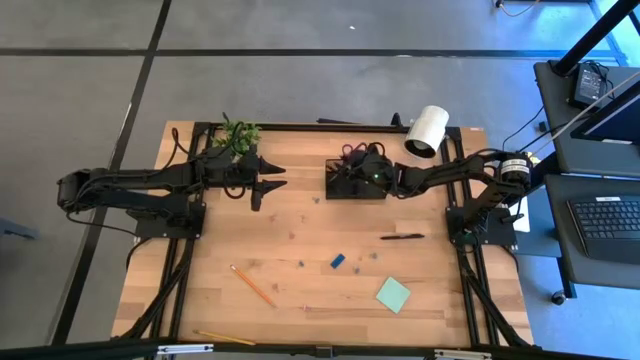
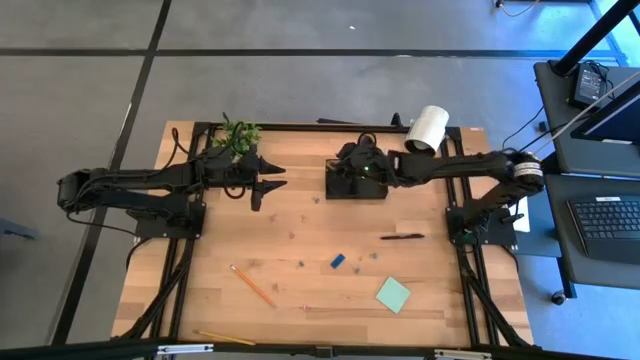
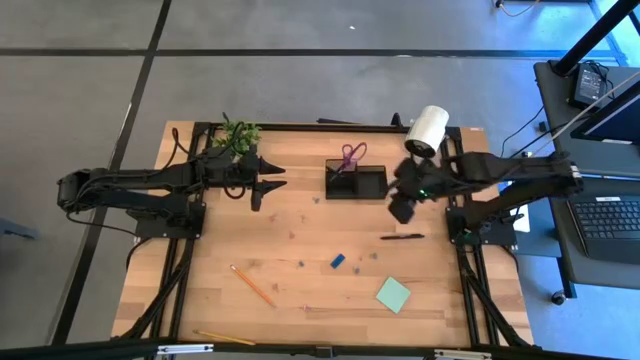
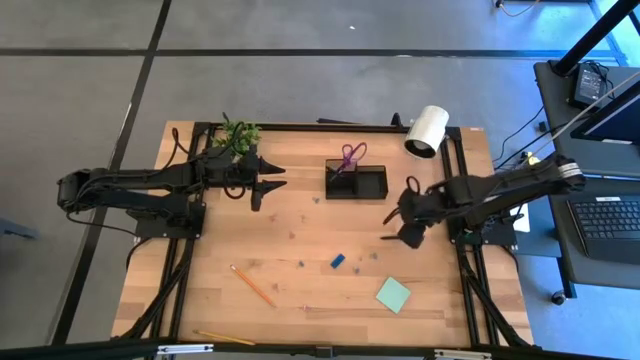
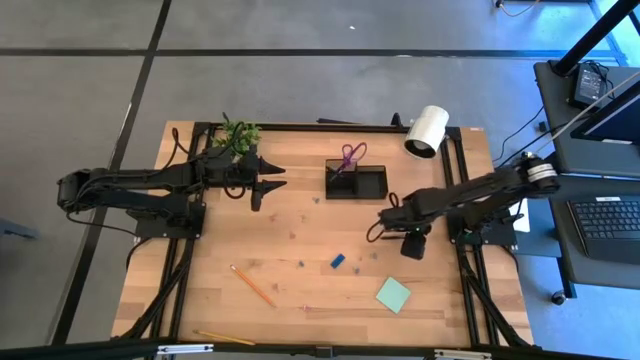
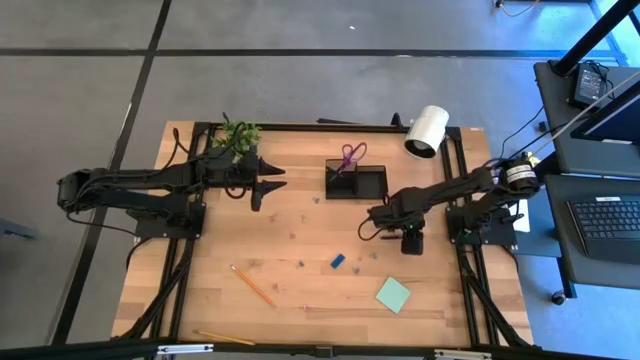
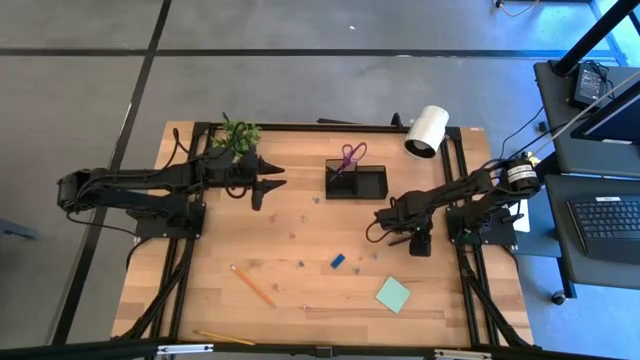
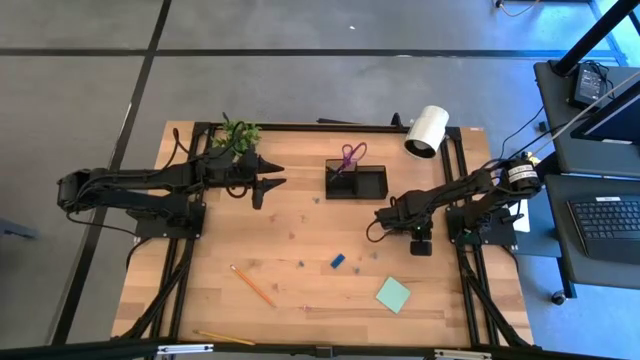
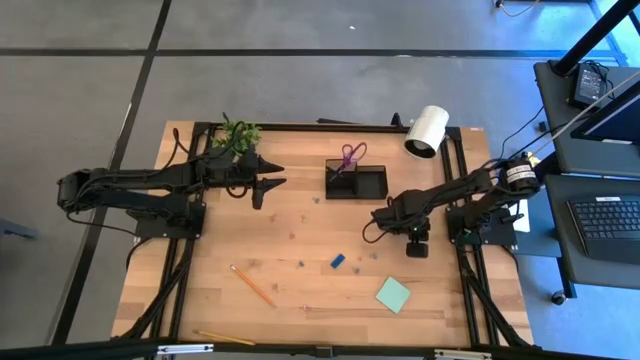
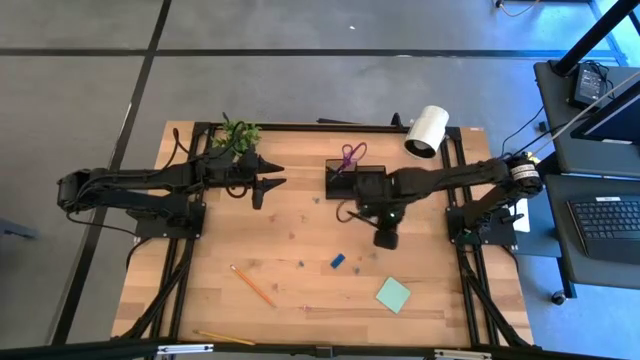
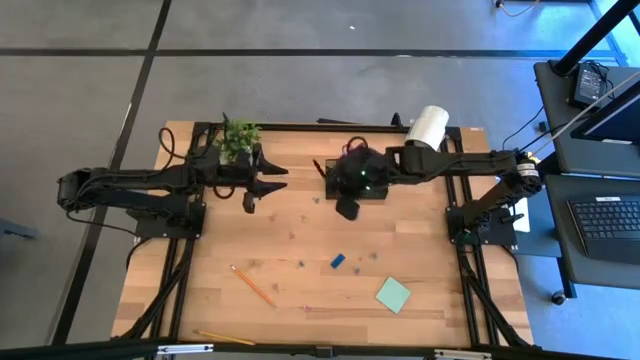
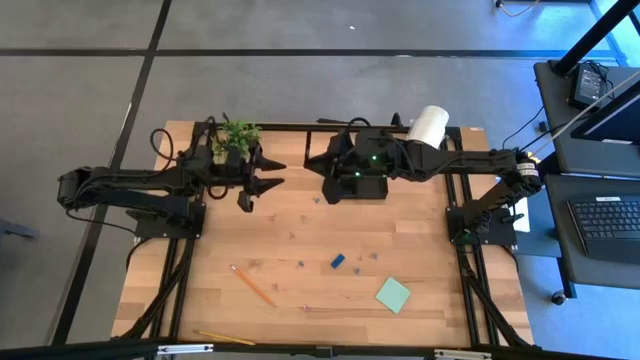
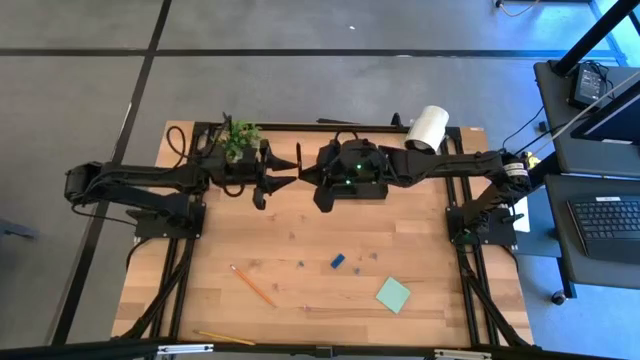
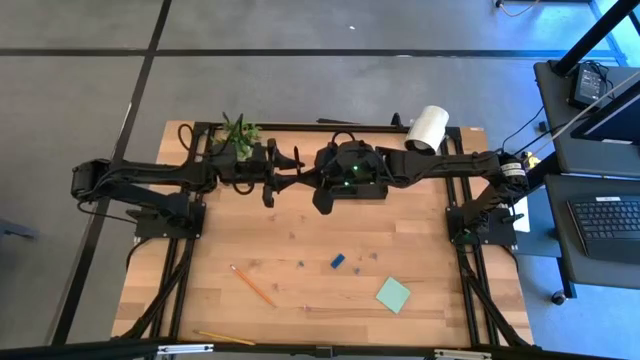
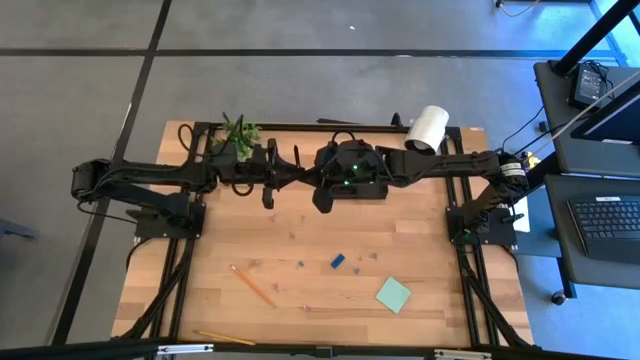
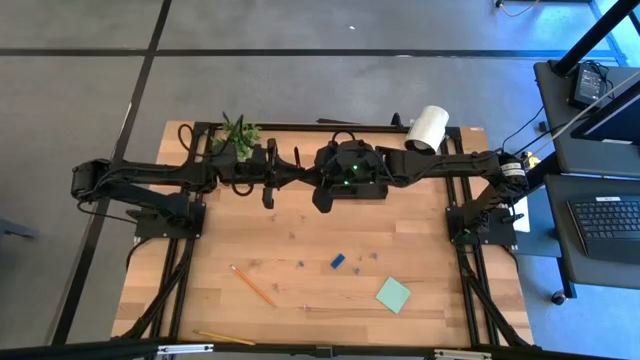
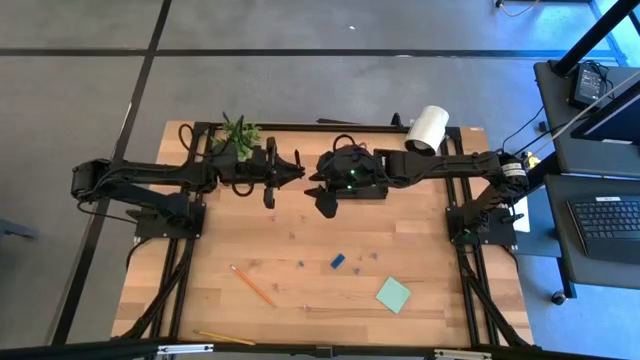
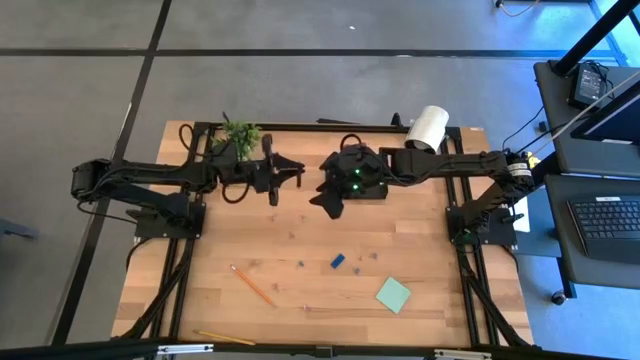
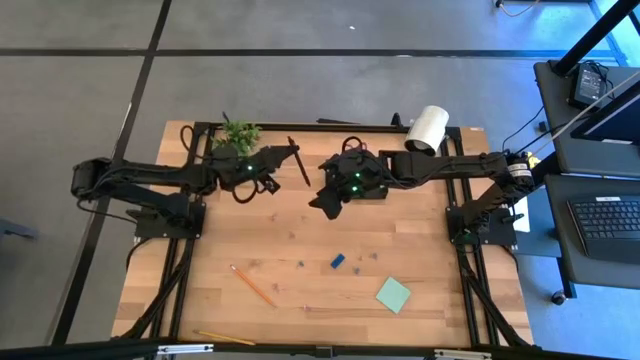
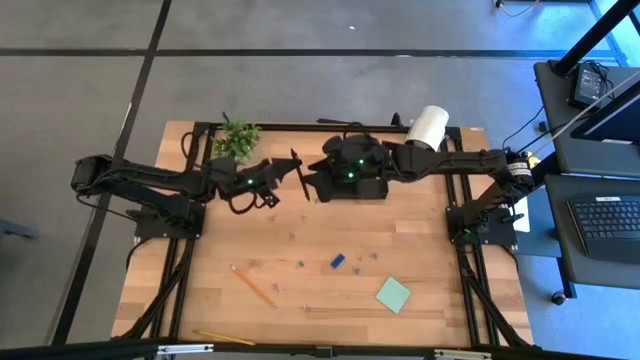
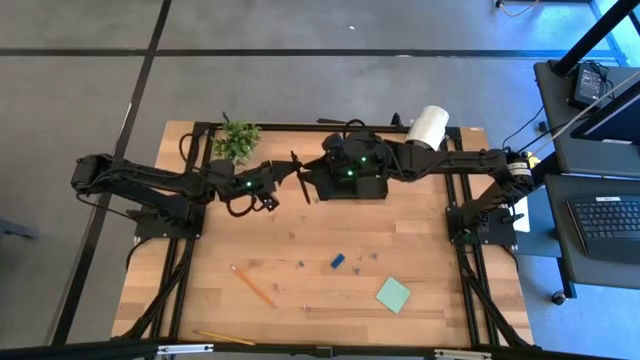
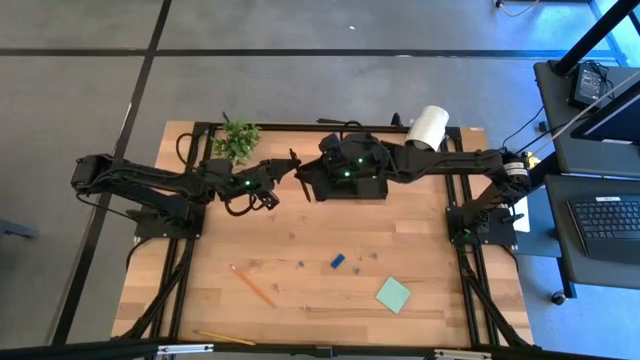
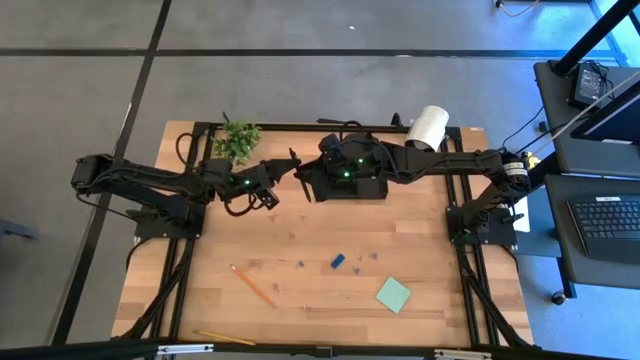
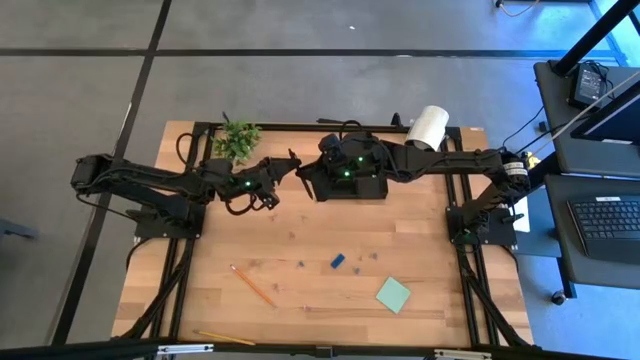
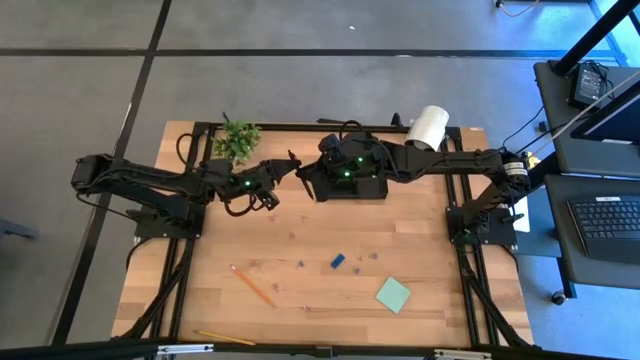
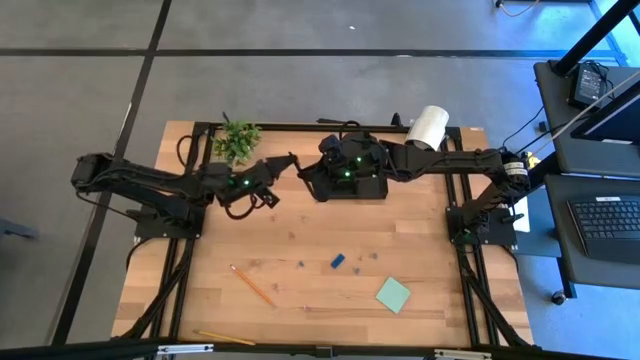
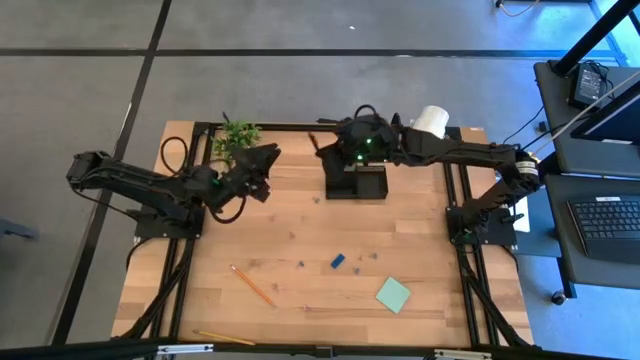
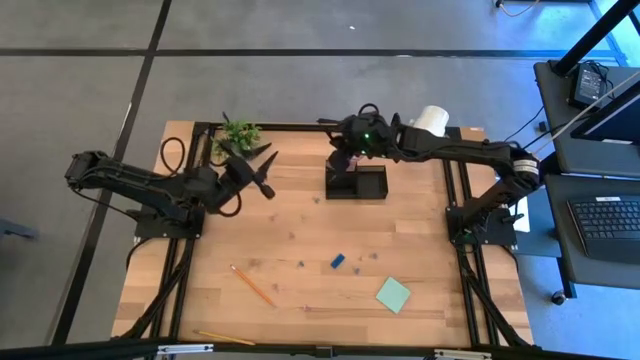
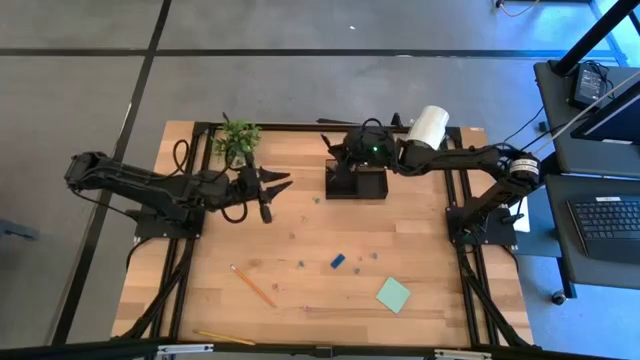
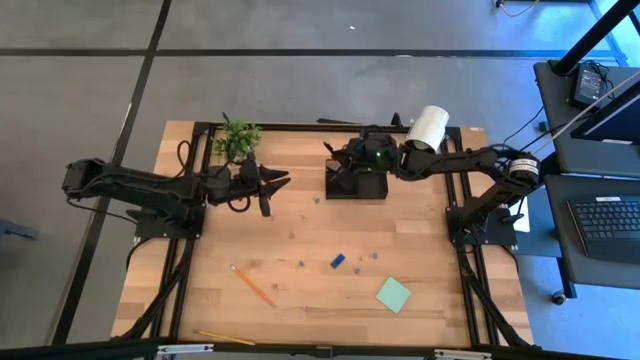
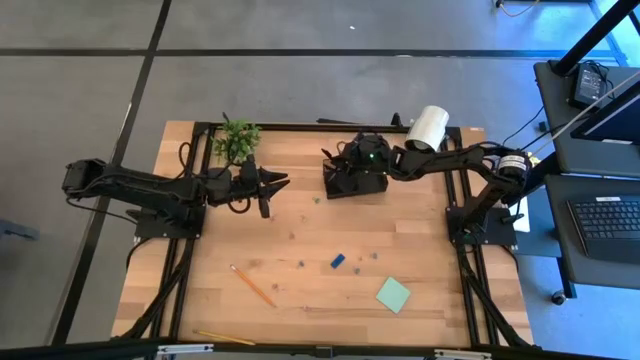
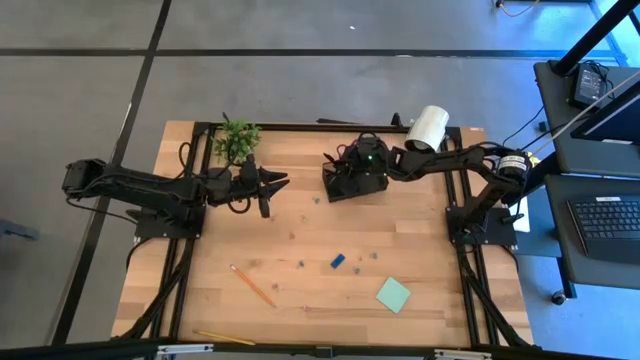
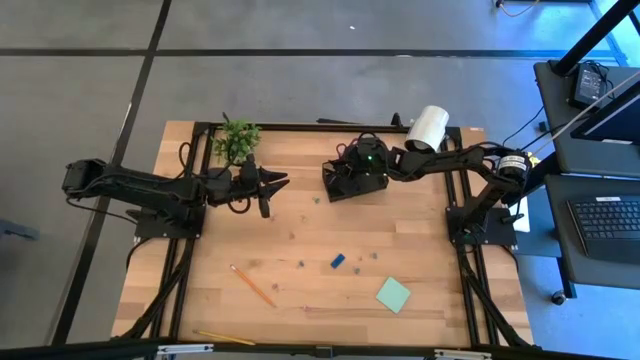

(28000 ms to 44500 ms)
Task: Pick and place office supplies into organizer
Put the black pen into the black desk organizer

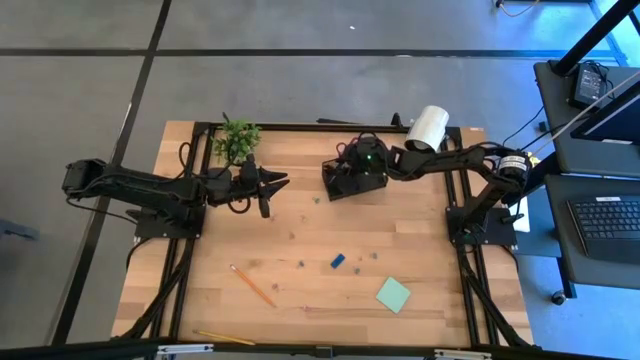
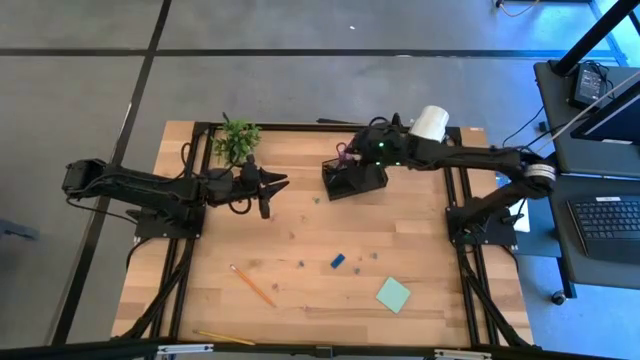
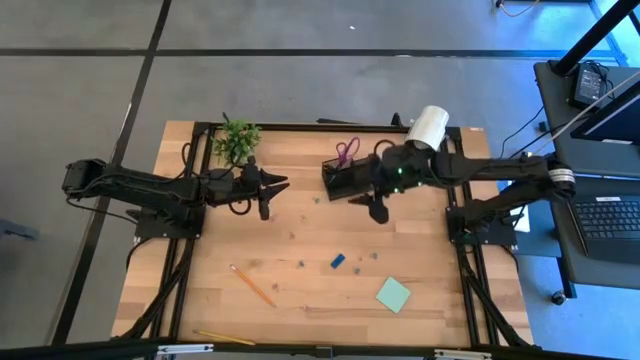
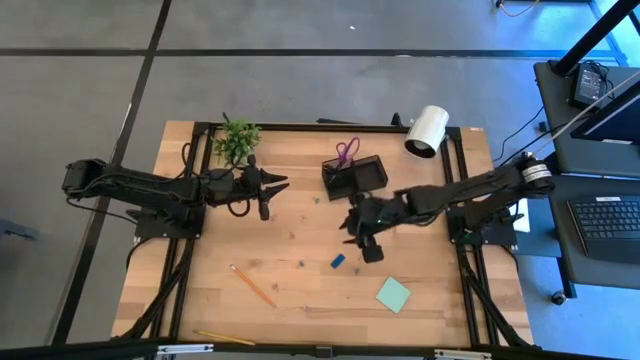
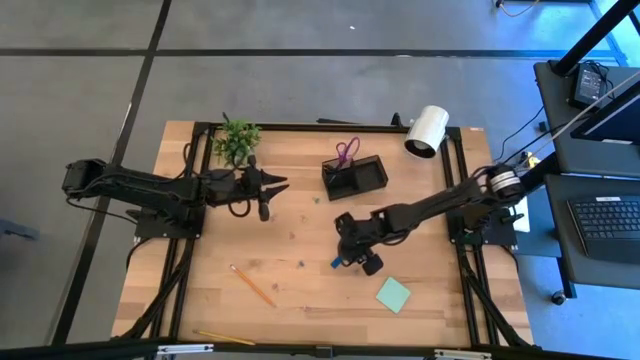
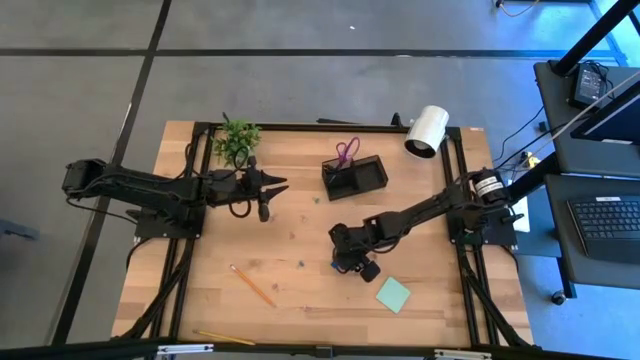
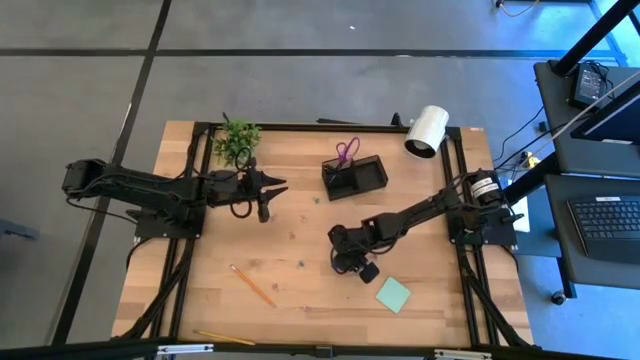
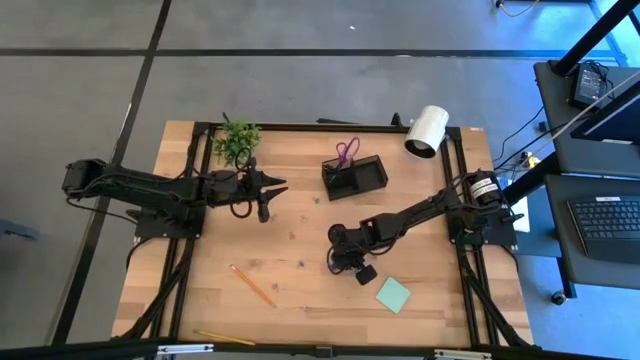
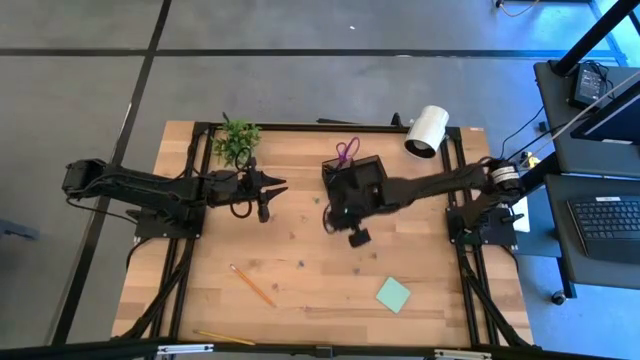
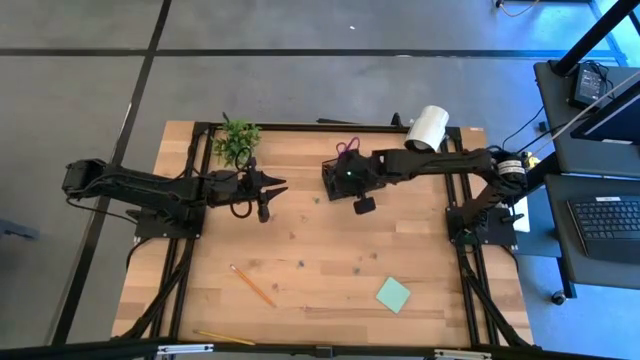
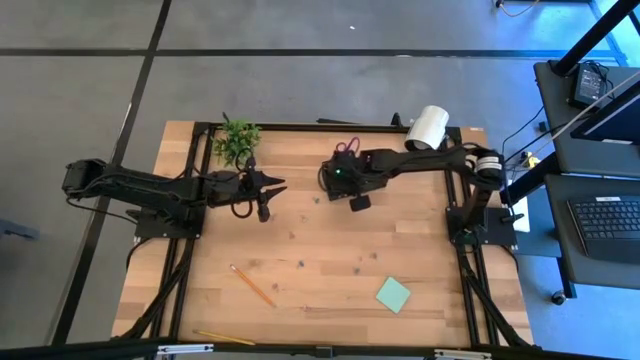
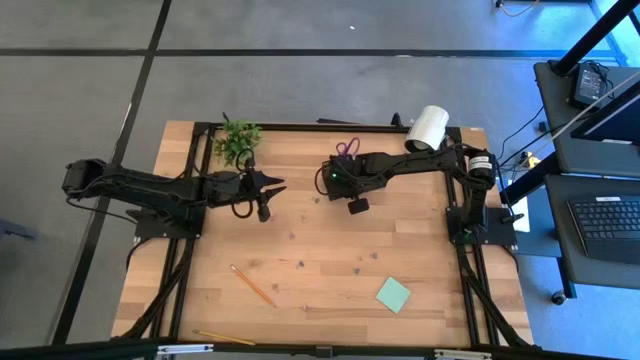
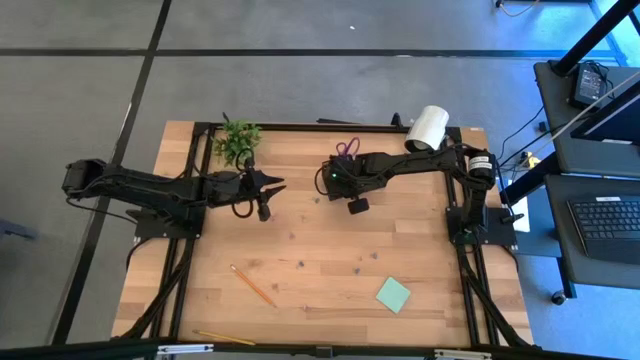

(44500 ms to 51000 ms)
Put the blue eraser into the black desk organizer
